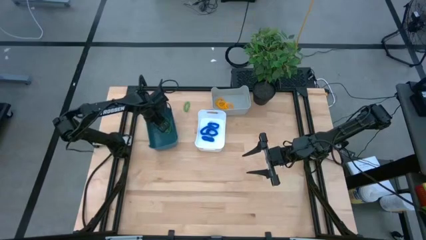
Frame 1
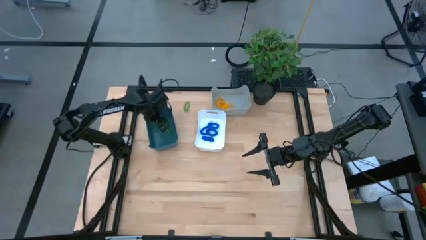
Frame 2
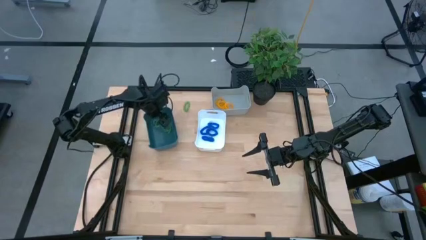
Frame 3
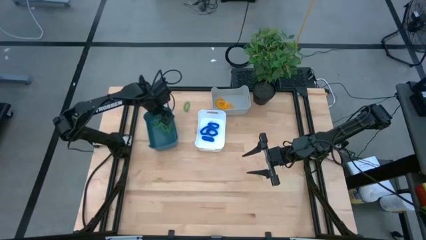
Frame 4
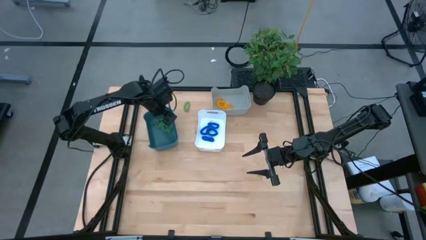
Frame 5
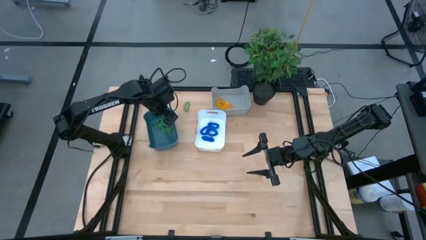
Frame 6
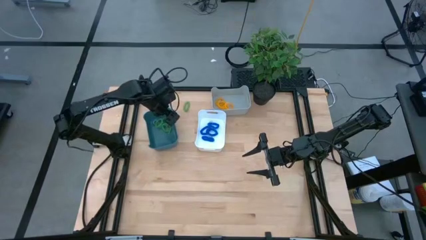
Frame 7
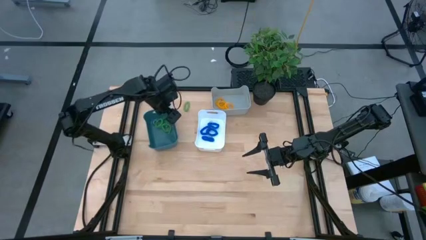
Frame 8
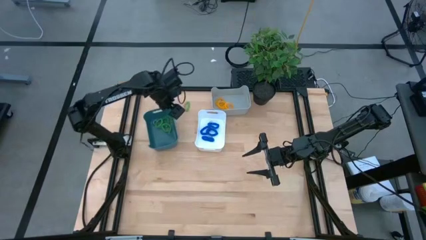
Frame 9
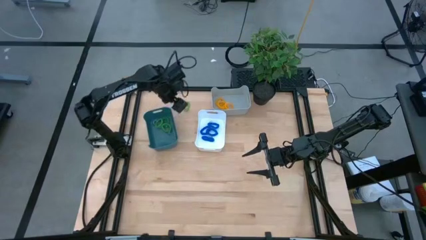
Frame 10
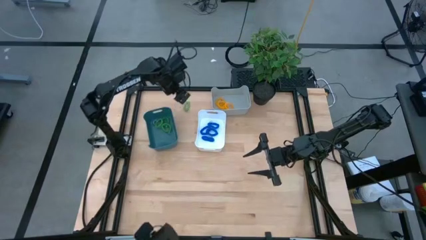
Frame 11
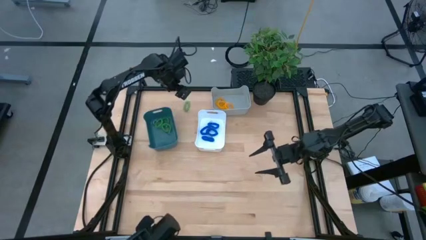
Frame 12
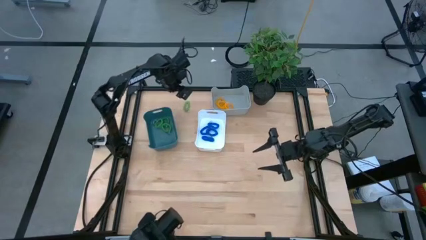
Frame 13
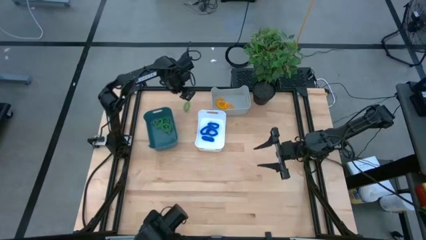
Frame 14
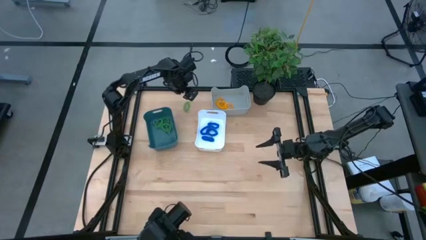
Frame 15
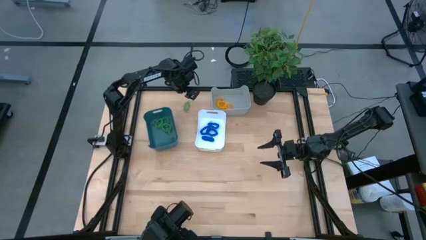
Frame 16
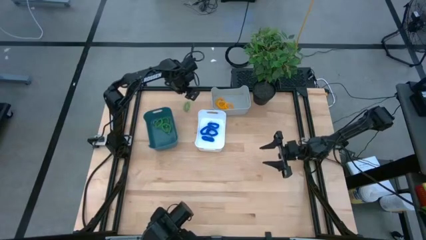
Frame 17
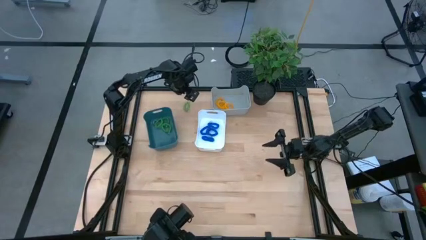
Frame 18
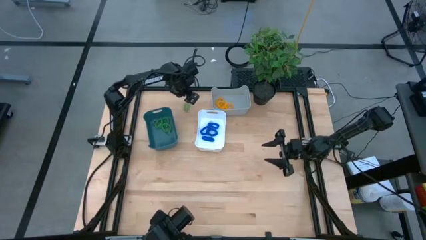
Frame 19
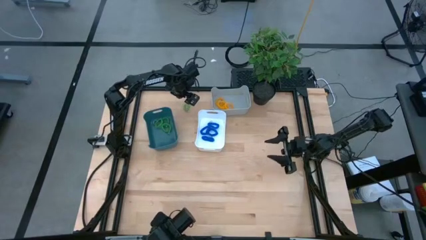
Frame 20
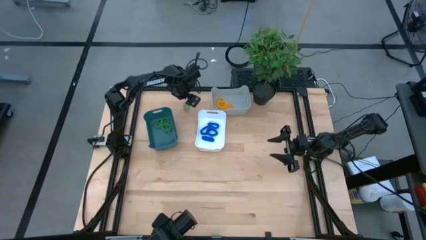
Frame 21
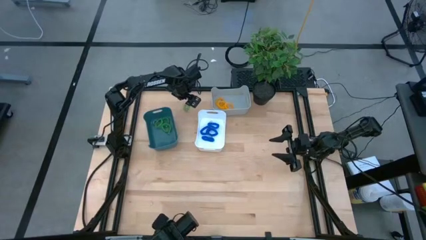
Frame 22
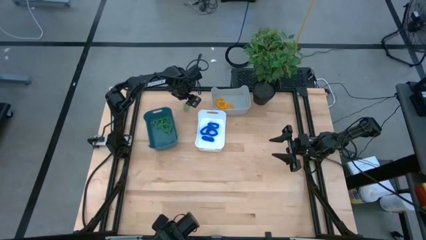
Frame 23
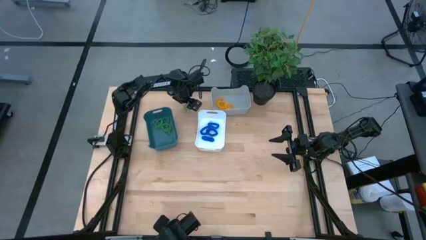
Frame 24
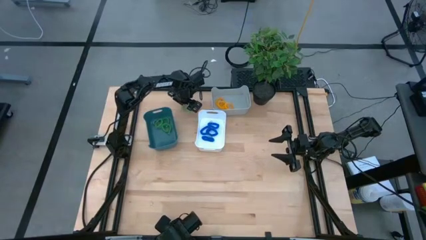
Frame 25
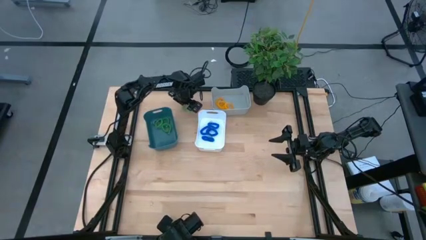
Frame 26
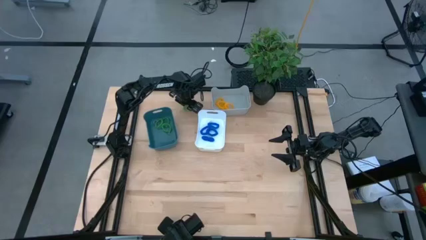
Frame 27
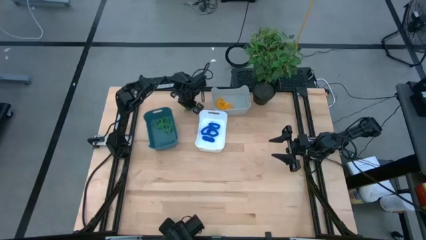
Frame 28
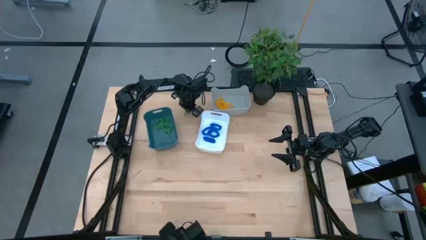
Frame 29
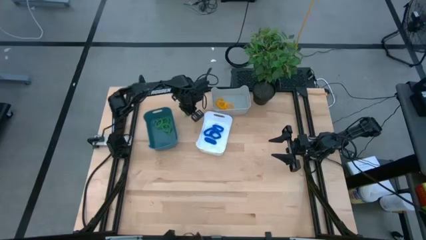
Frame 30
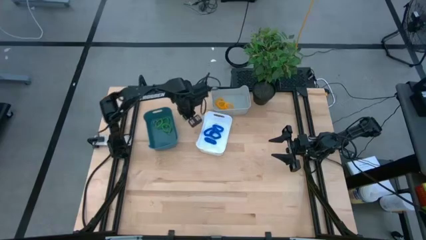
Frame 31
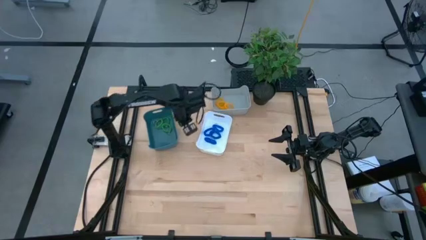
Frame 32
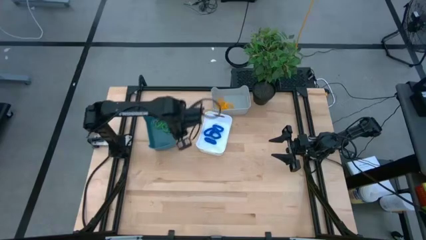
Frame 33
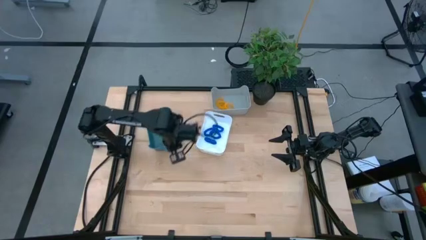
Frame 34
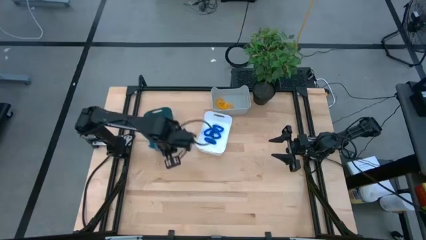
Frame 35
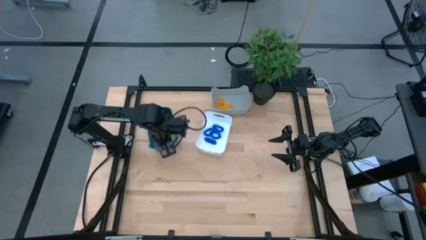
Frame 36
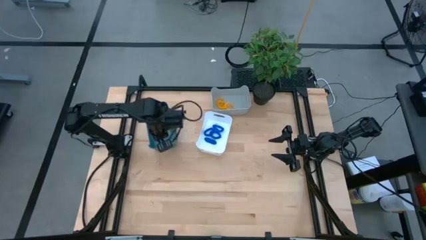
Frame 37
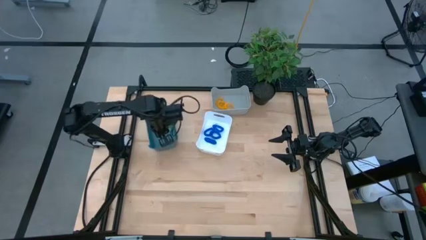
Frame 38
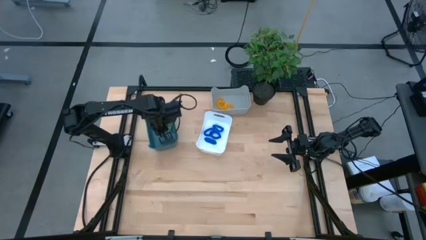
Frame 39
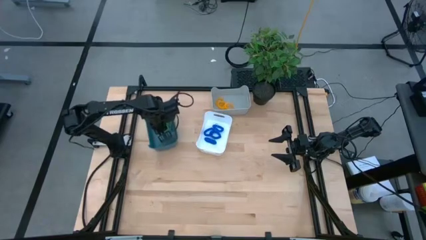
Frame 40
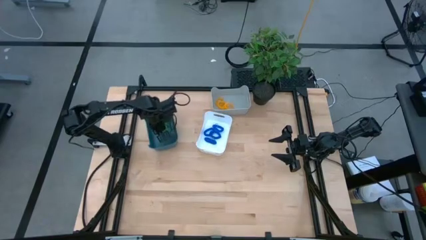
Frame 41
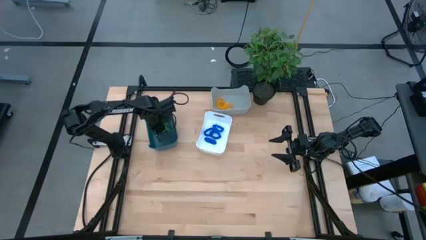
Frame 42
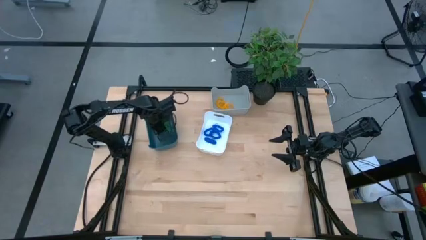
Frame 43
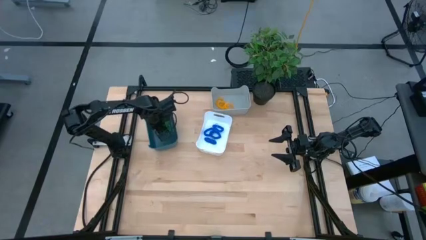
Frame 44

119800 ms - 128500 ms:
Task: Sort spring keychains
Put the green spring keychain into the blue bin

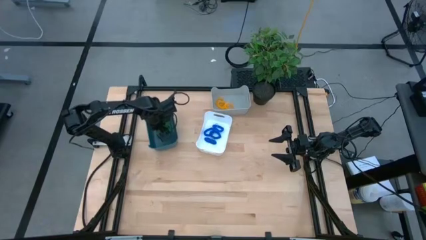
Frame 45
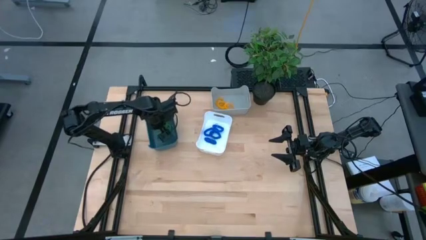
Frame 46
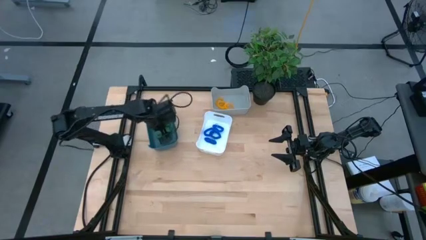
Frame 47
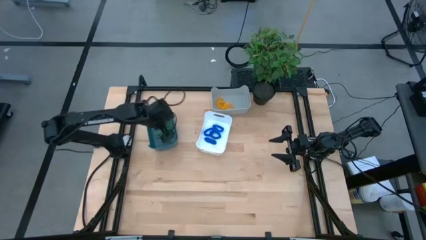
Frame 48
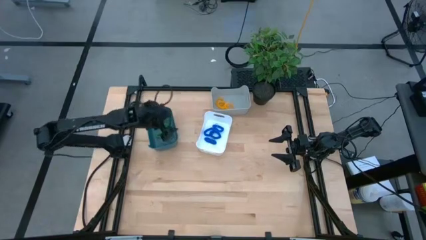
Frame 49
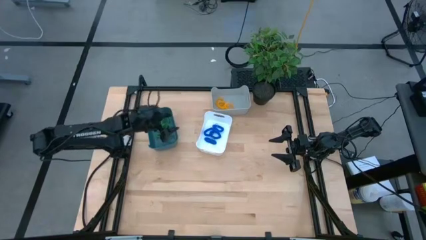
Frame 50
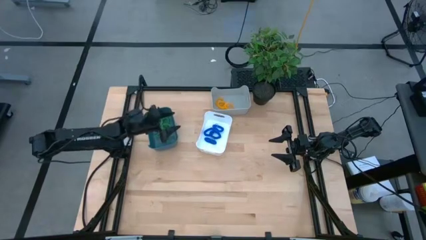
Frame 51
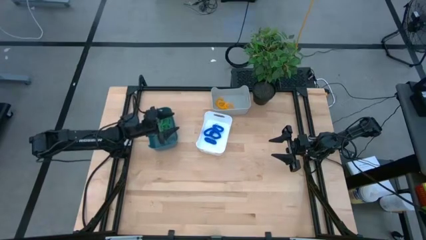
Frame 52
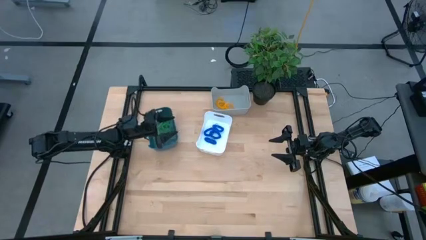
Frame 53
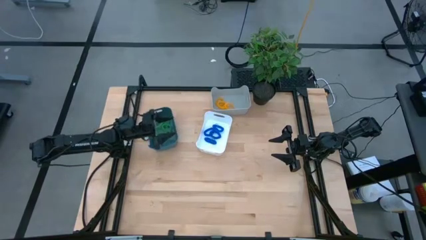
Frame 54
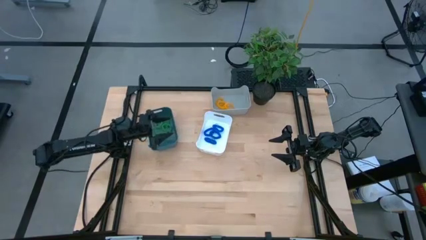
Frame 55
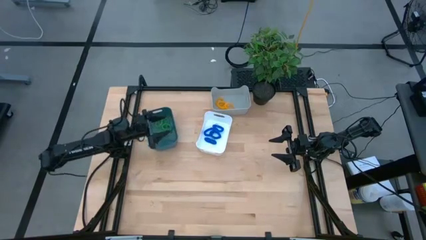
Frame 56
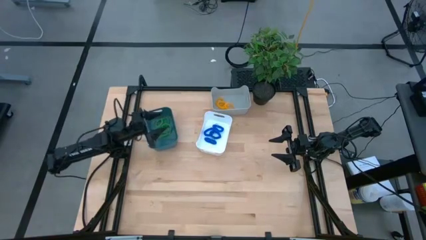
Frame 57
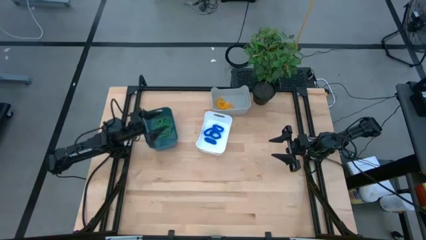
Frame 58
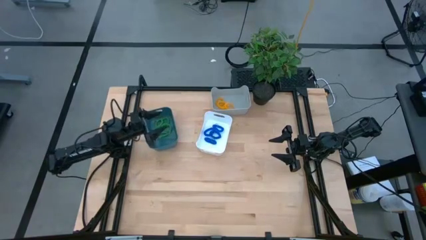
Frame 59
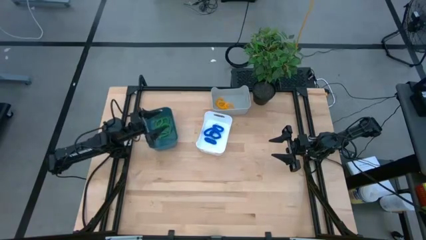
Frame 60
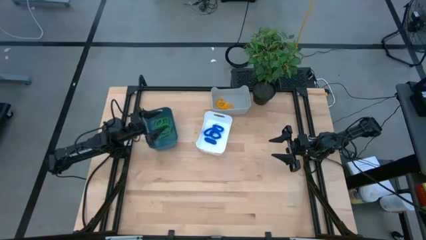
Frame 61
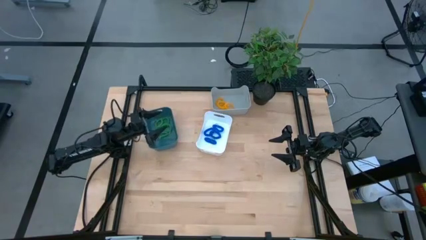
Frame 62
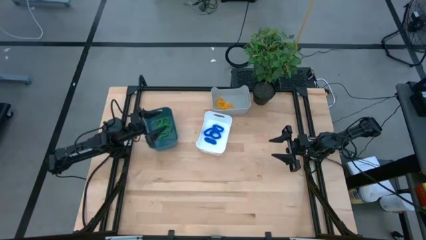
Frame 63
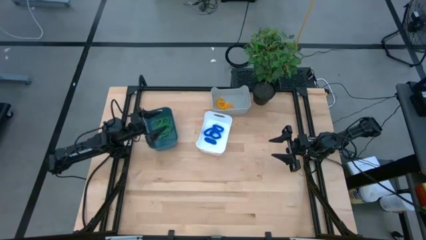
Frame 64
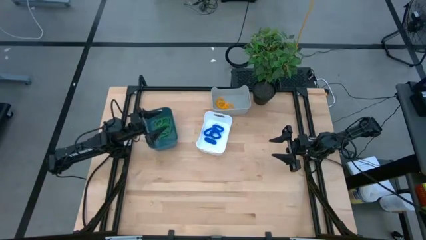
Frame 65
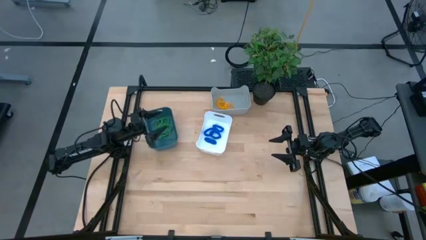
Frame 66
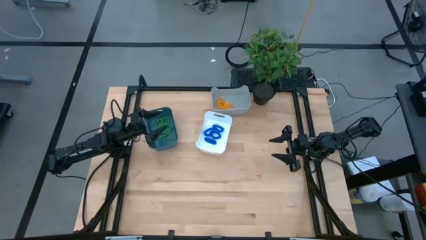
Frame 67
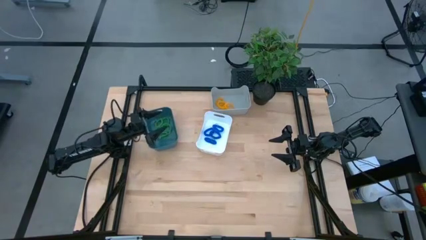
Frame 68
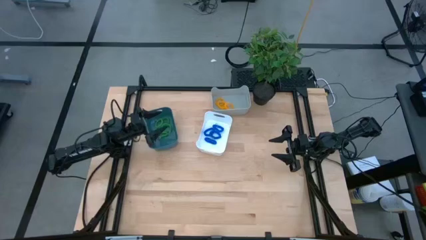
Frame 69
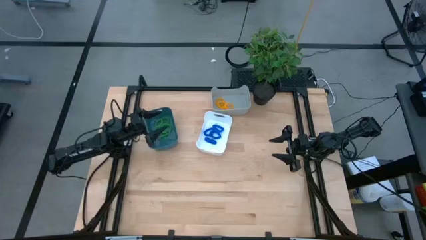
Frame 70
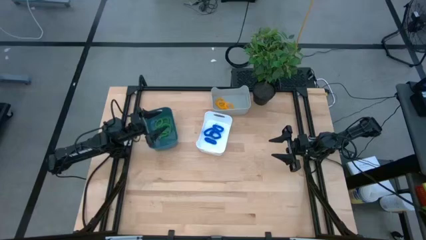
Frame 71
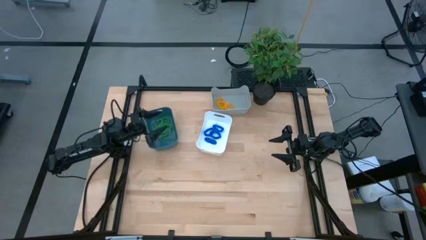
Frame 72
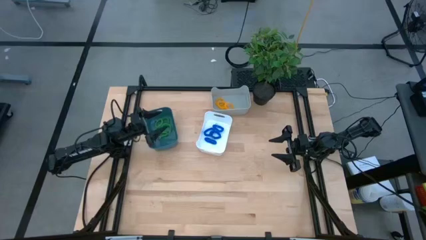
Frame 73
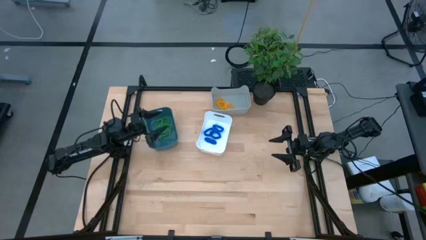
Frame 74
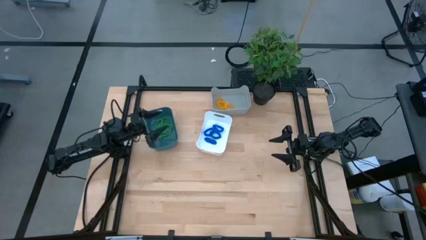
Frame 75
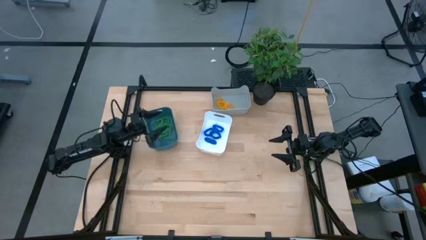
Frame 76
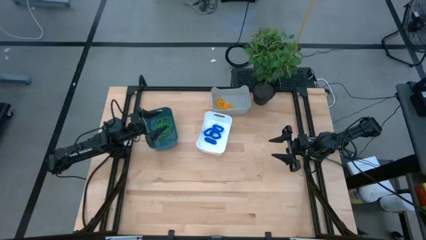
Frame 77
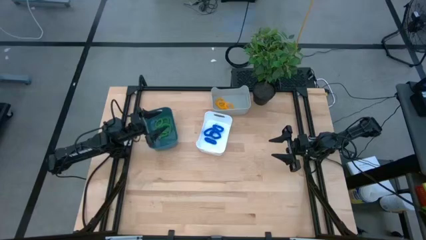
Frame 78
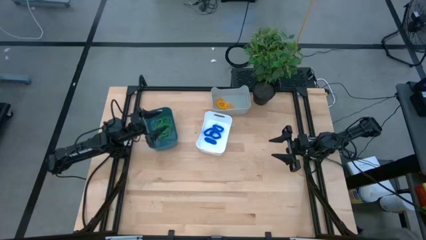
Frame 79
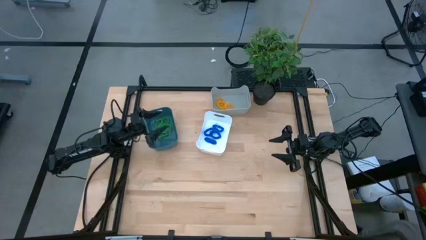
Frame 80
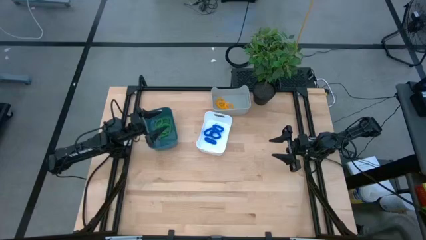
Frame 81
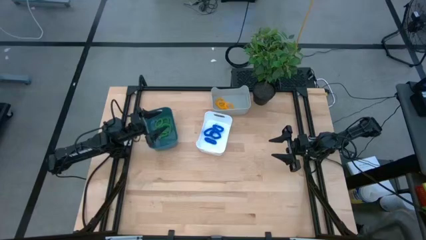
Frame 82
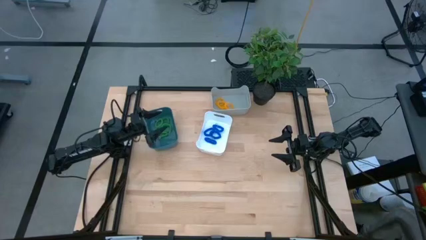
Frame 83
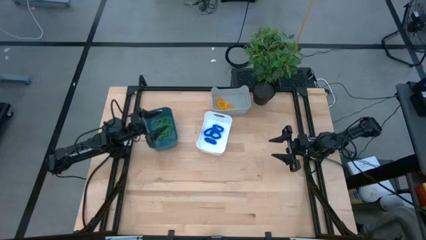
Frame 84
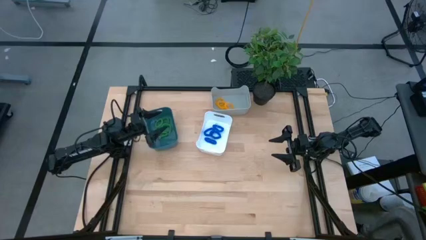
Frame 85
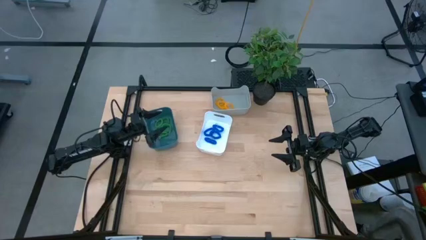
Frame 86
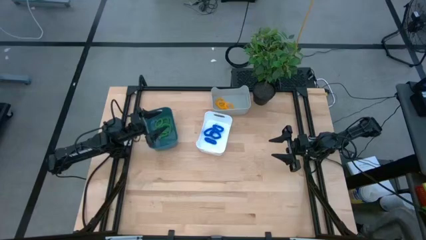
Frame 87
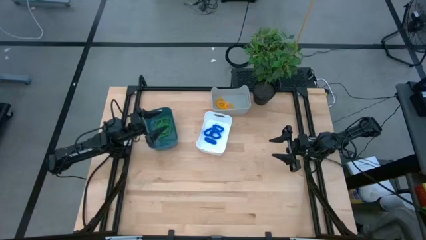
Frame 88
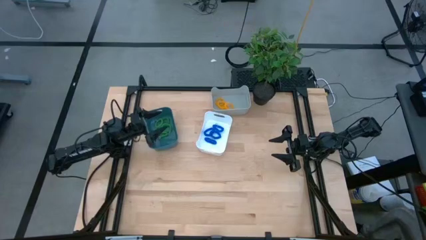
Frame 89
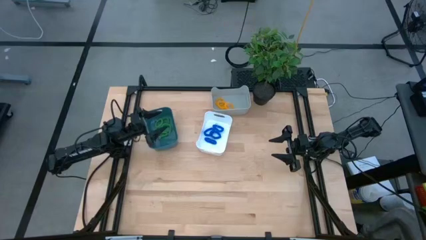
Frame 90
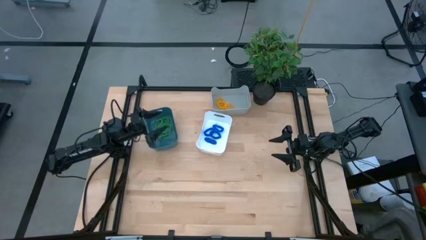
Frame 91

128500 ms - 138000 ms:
Return to Home Position
